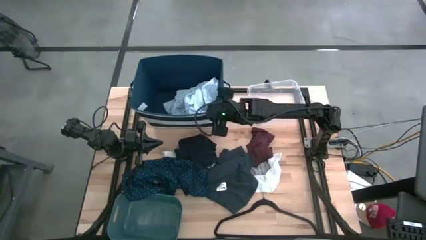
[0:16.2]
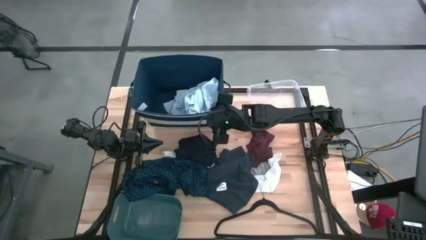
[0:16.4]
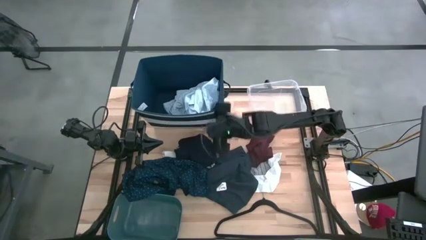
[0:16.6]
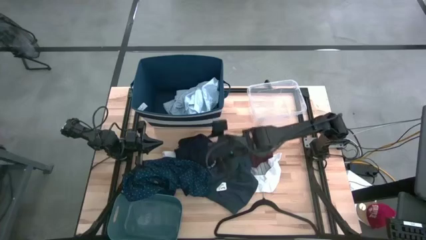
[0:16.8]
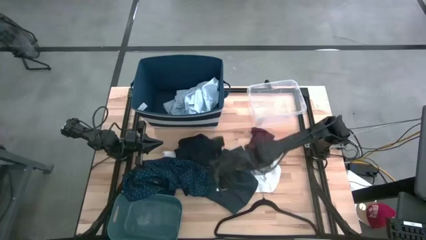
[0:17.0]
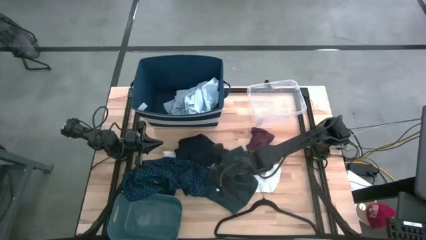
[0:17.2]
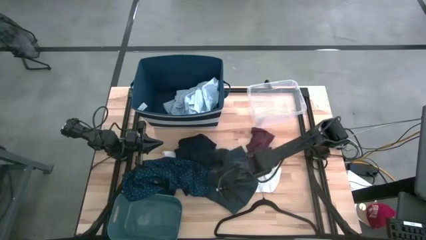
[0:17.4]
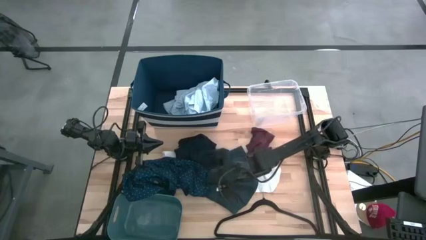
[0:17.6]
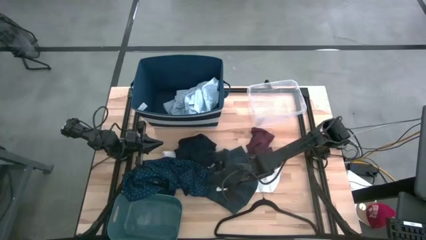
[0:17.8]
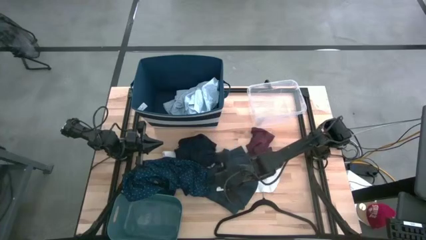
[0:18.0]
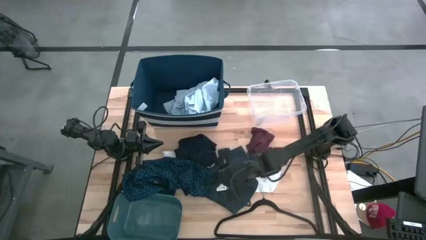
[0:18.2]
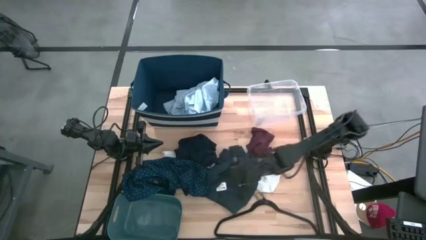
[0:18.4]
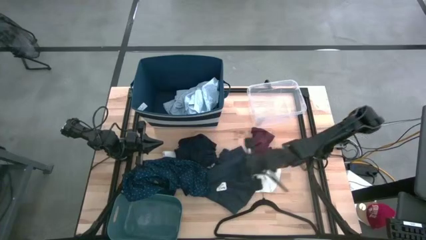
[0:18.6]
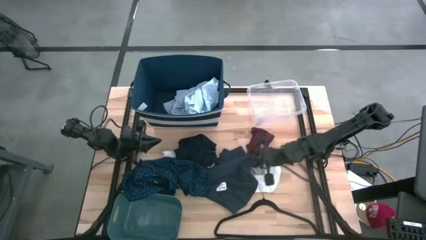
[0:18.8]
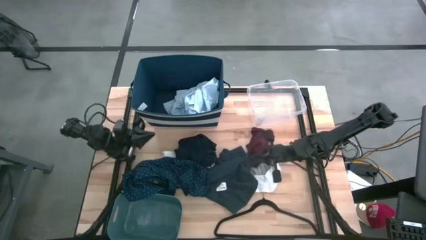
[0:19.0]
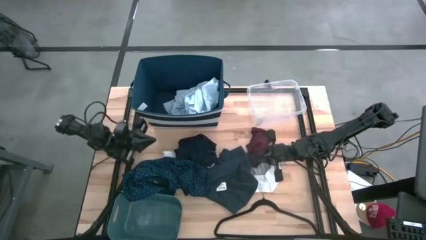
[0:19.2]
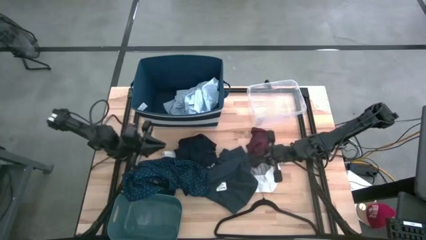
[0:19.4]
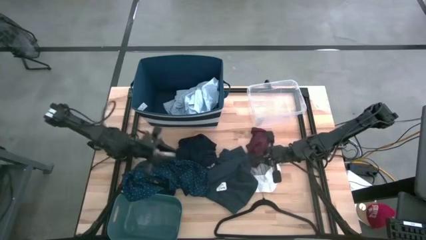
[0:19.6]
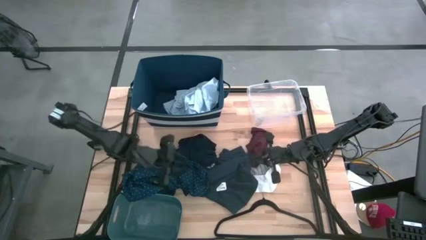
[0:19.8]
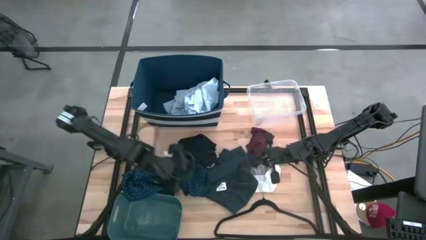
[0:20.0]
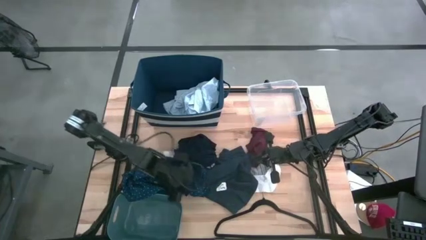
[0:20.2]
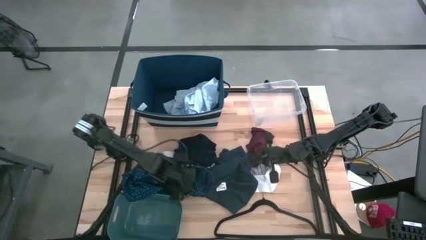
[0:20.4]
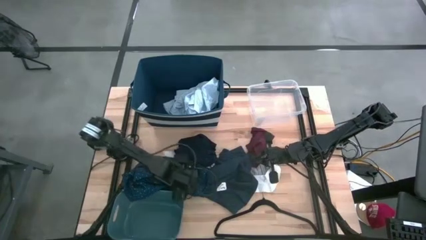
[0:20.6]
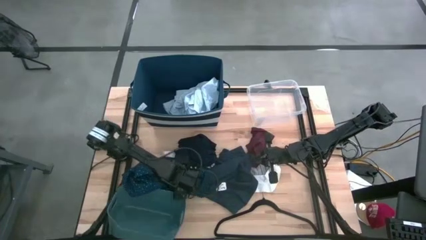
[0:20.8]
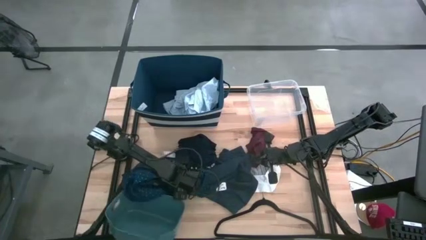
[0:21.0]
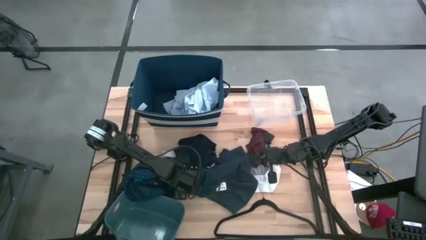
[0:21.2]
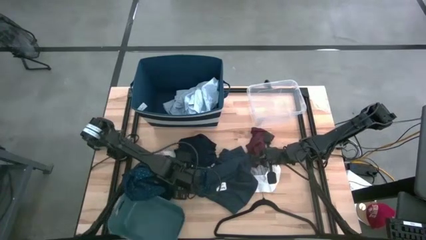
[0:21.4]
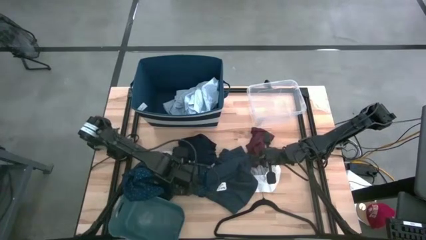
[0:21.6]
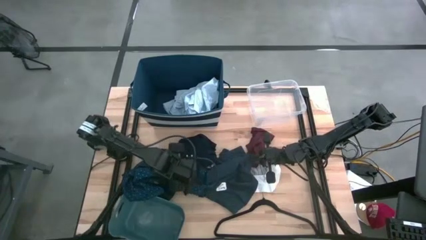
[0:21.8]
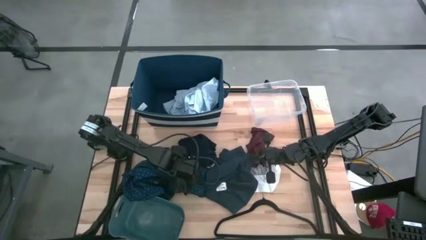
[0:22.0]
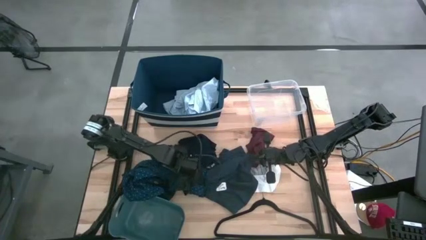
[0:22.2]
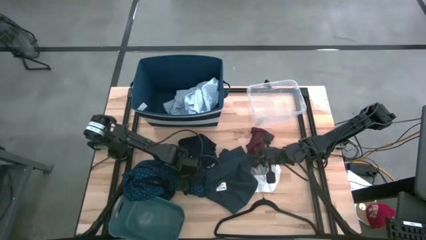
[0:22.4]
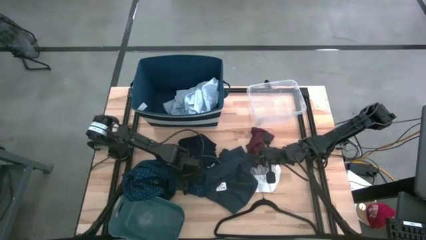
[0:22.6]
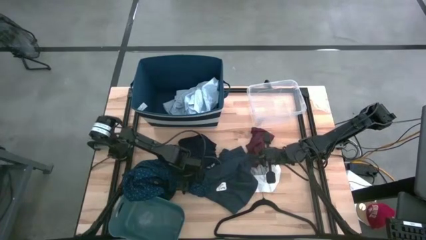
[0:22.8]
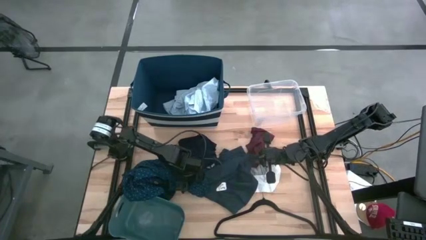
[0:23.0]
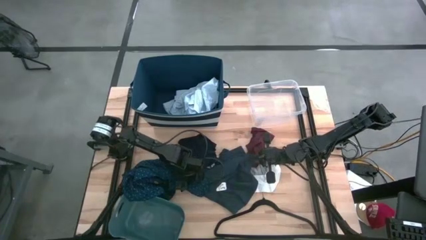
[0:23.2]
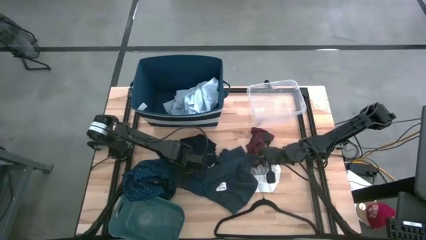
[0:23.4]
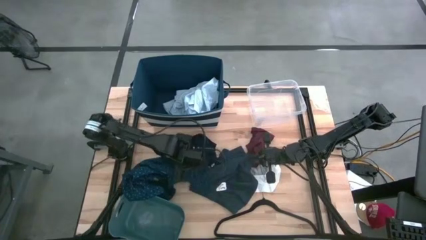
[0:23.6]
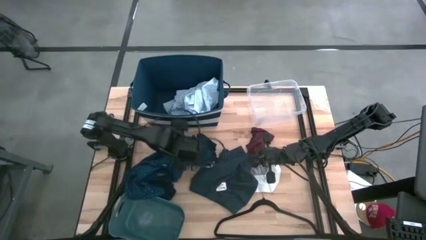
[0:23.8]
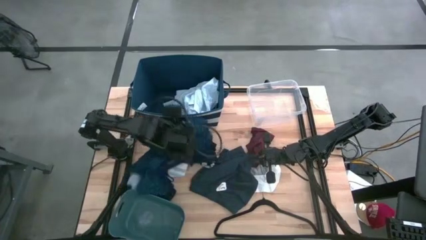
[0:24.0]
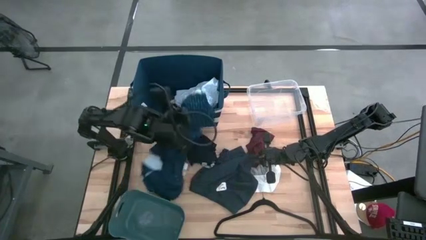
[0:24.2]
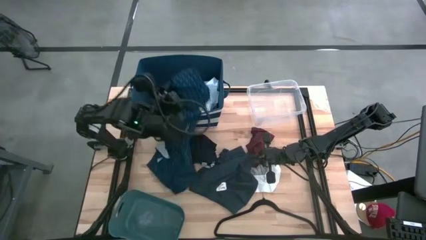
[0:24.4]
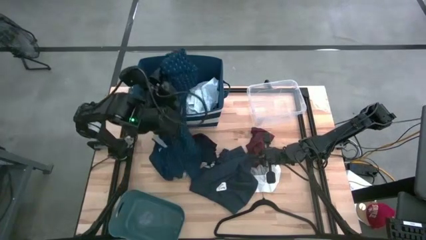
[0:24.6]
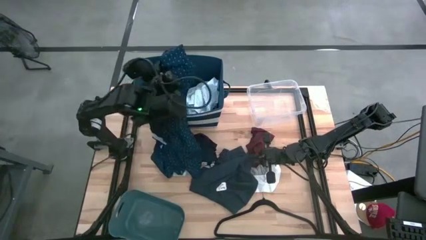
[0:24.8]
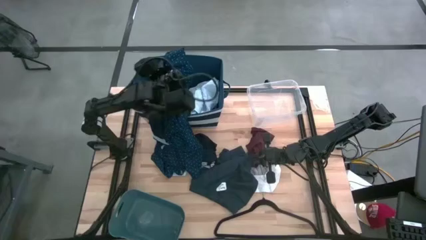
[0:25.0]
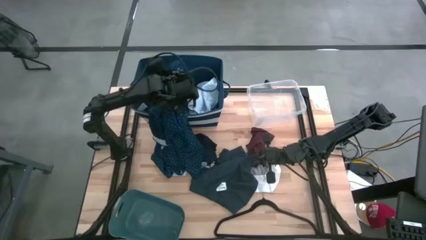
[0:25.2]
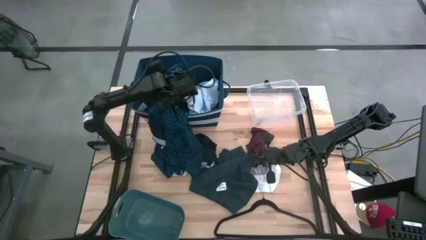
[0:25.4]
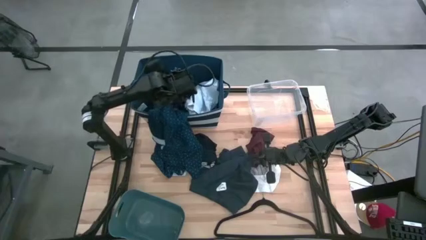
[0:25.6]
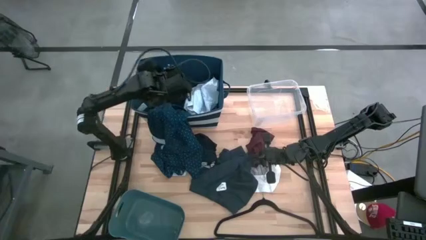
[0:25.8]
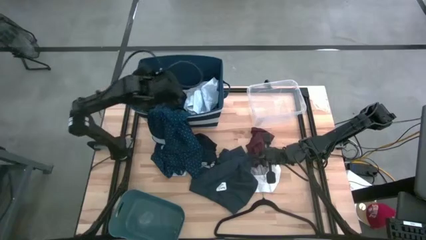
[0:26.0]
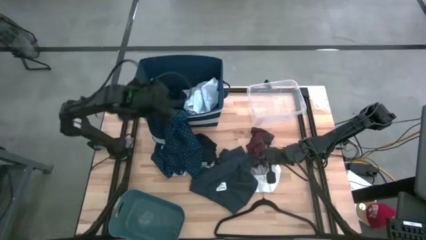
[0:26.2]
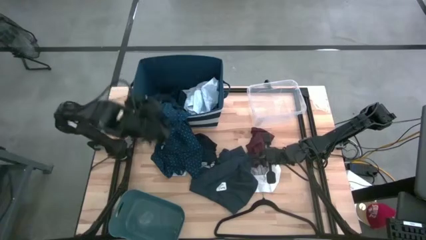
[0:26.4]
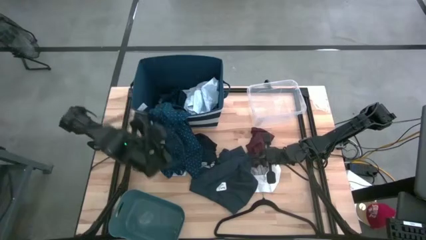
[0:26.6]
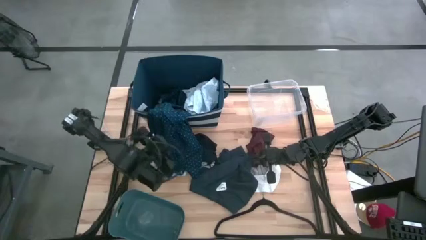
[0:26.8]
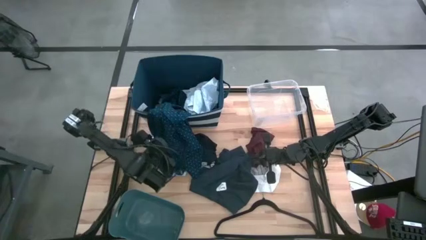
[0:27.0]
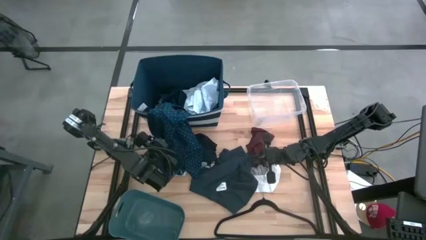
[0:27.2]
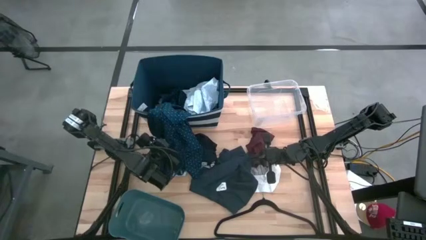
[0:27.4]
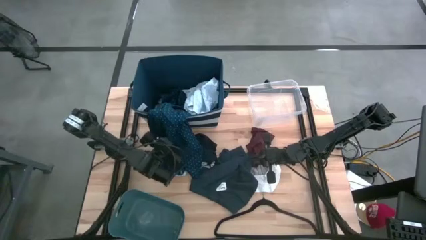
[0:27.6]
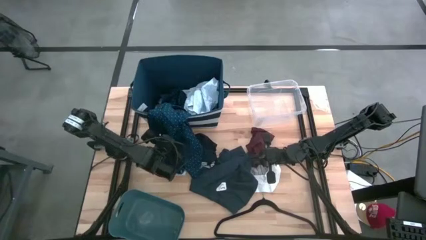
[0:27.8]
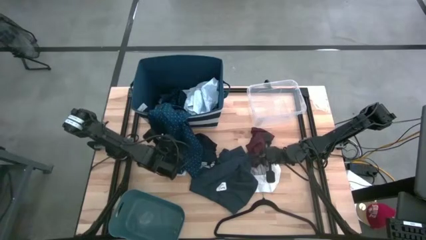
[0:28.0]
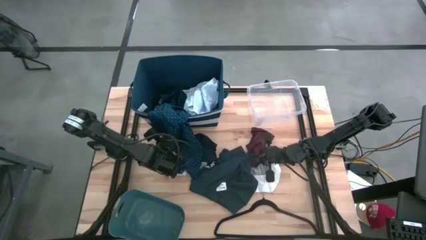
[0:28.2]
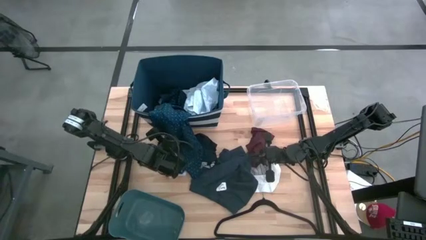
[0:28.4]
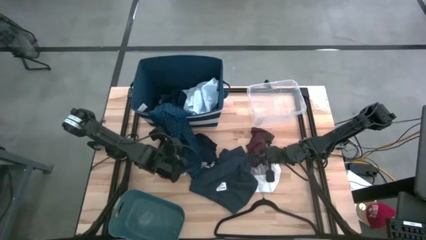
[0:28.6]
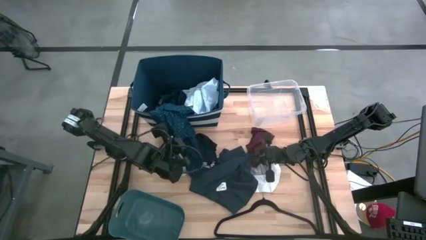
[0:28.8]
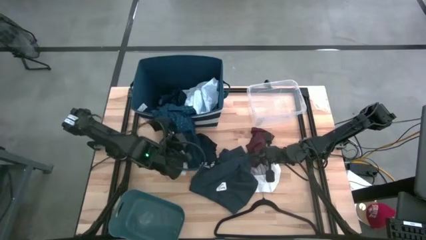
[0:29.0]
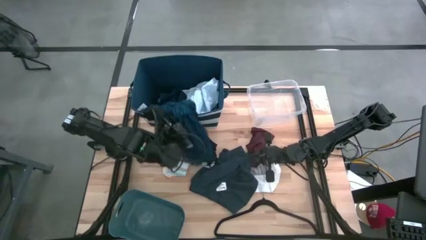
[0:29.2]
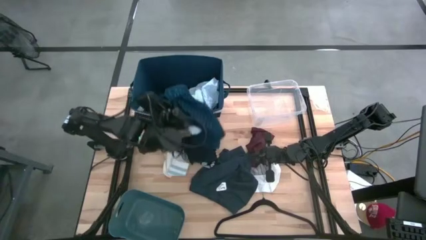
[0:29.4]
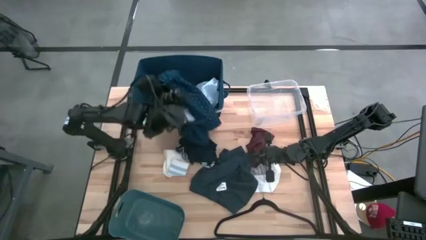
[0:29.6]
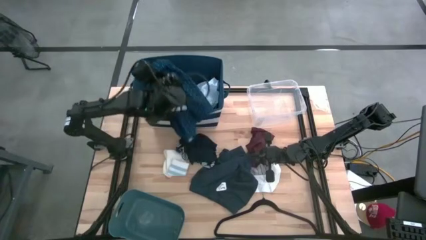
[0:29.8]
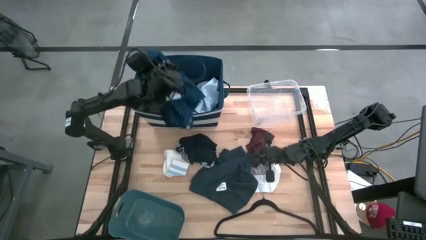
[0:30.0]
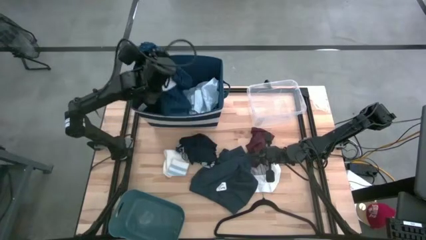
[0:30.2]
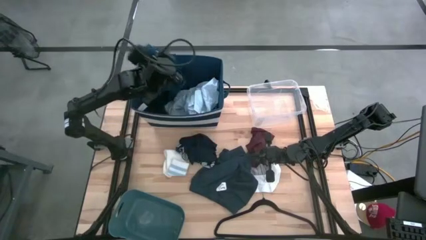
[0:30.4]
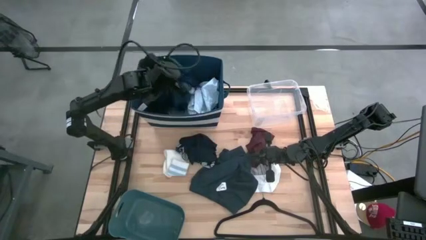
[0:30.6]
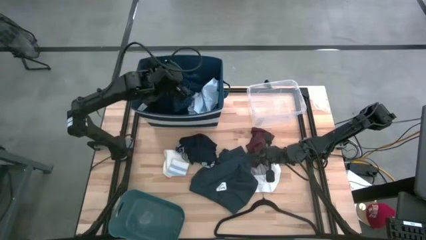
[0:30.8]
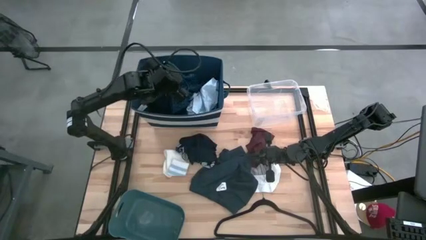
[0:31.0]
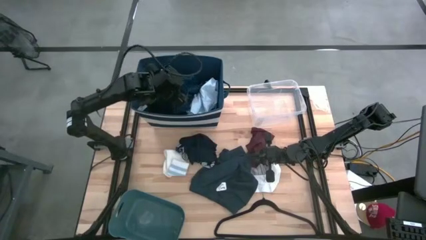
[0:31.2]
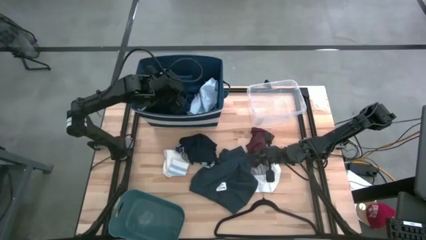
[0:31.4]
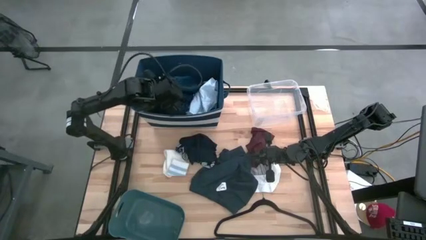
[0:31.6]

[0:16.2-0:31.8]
Task: Pick & Place Cloths
Put the blue polo shirt into the blue laundry organizer
